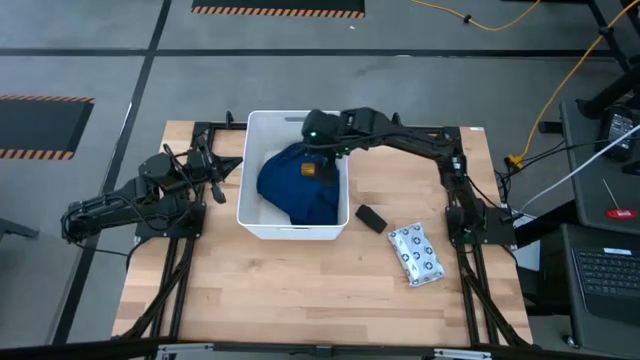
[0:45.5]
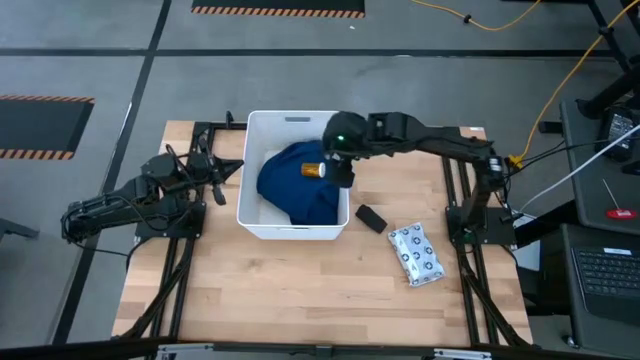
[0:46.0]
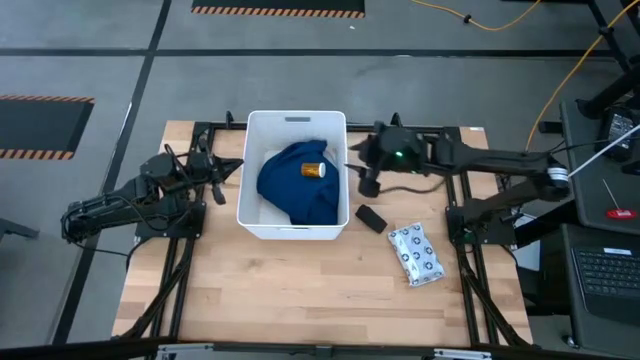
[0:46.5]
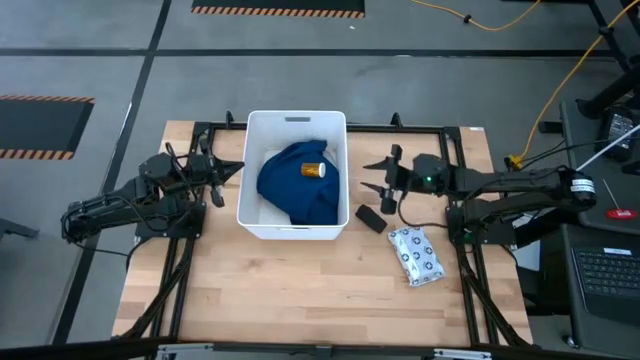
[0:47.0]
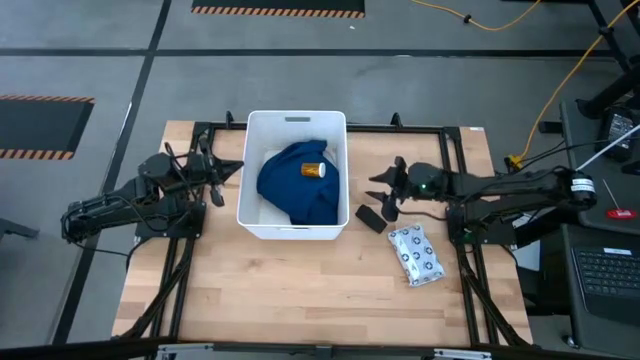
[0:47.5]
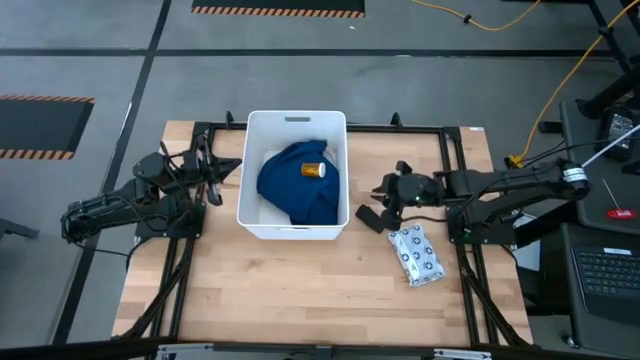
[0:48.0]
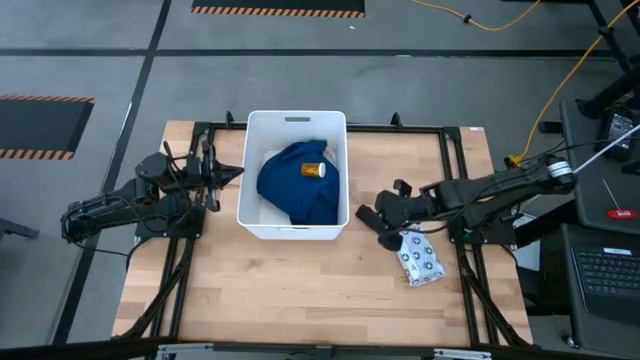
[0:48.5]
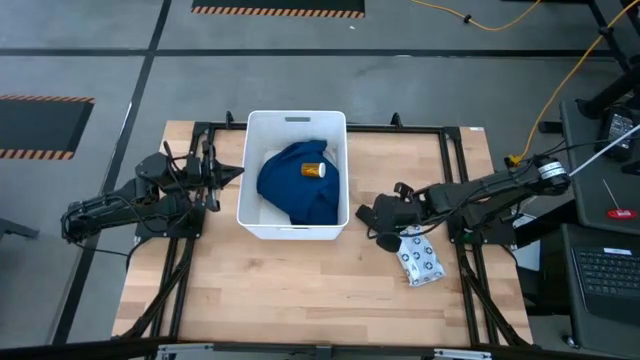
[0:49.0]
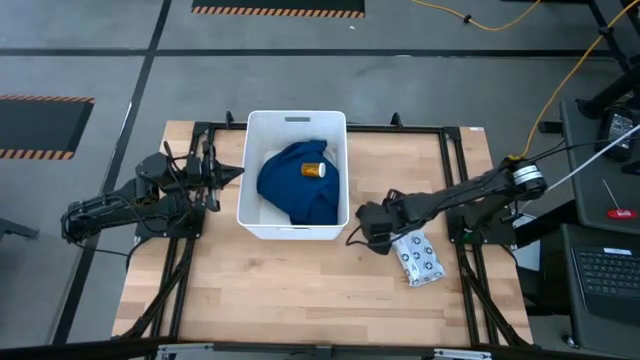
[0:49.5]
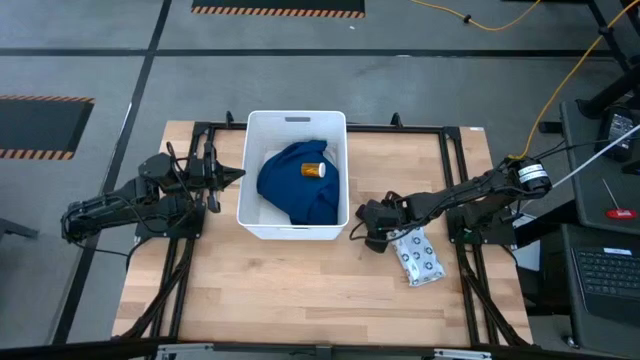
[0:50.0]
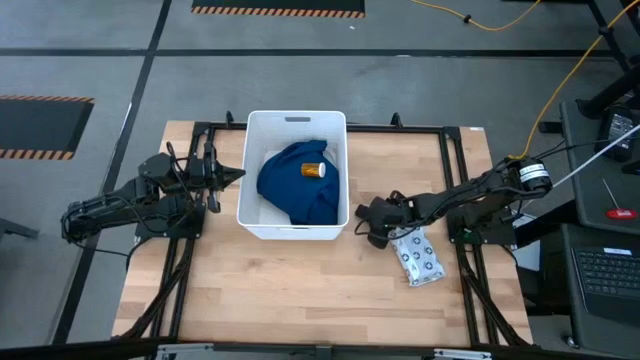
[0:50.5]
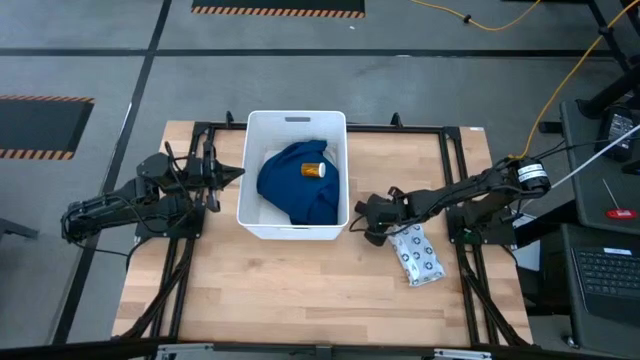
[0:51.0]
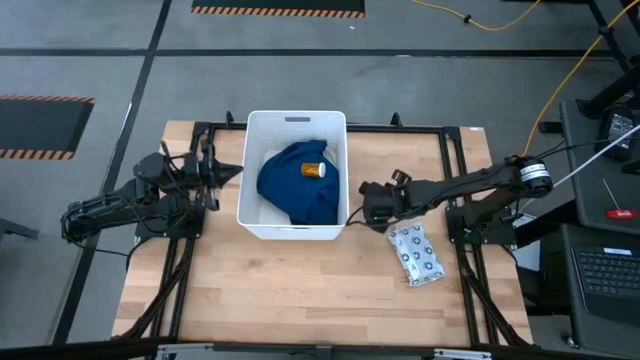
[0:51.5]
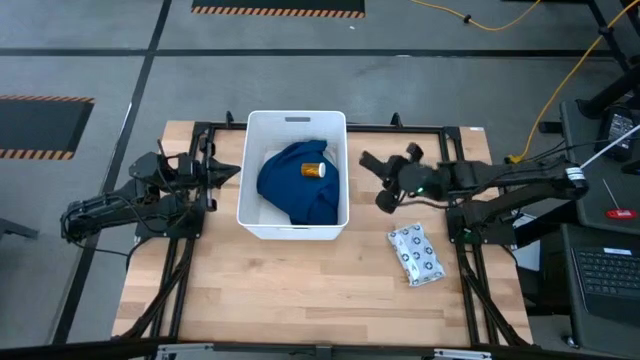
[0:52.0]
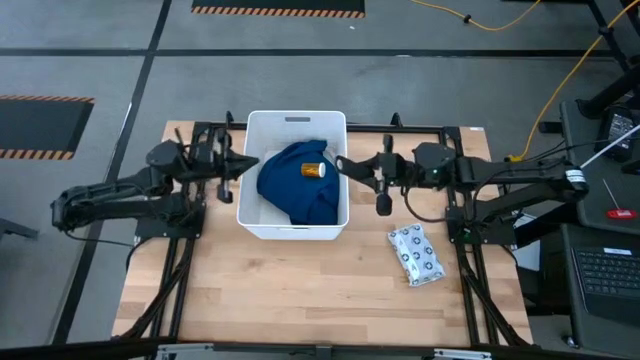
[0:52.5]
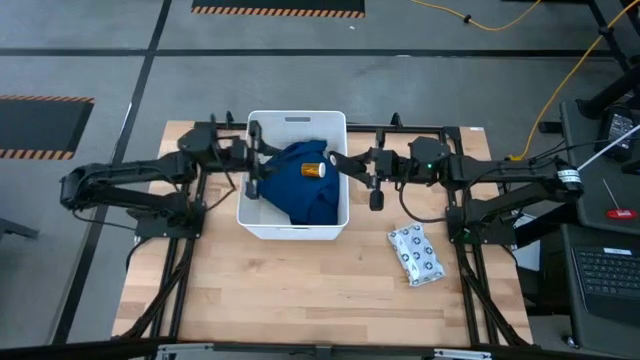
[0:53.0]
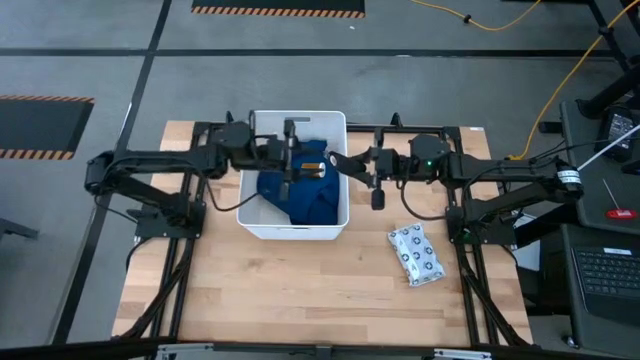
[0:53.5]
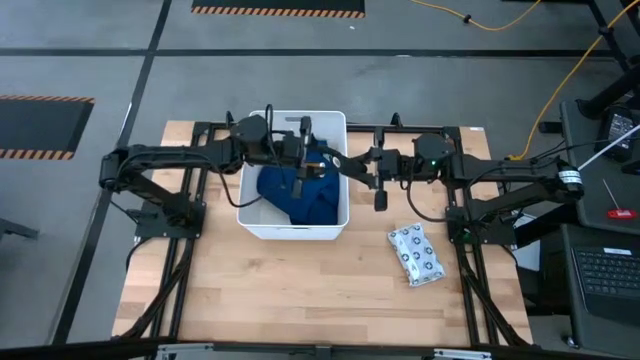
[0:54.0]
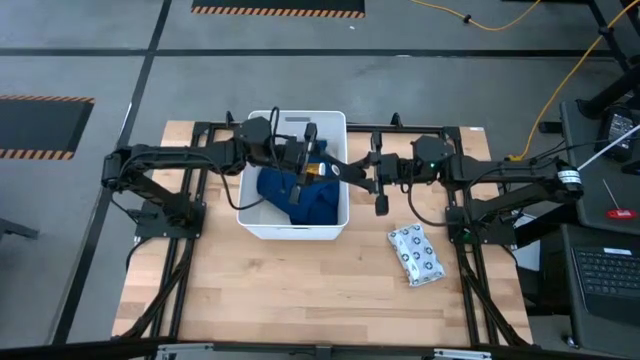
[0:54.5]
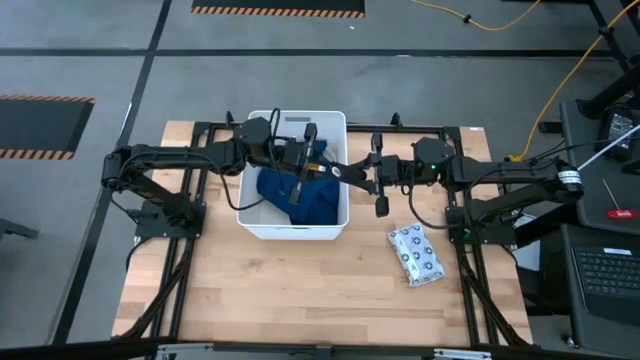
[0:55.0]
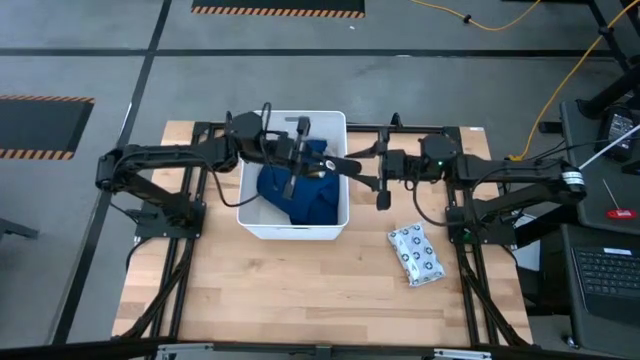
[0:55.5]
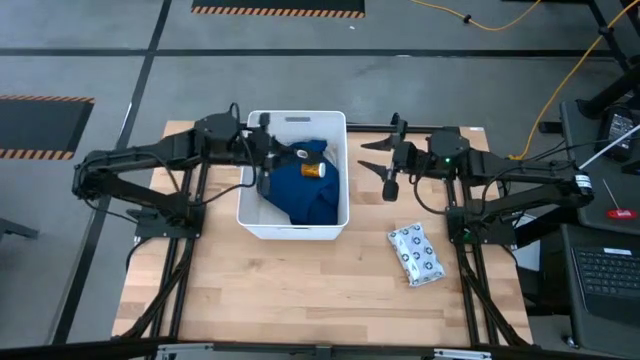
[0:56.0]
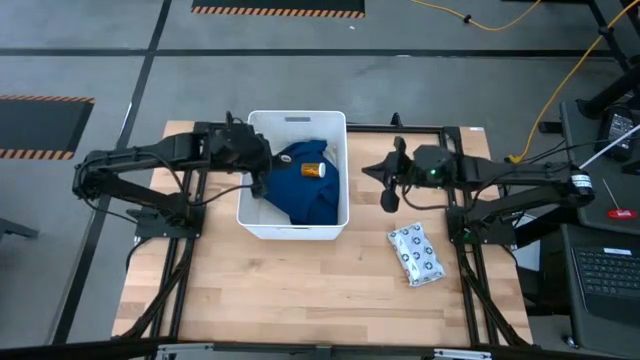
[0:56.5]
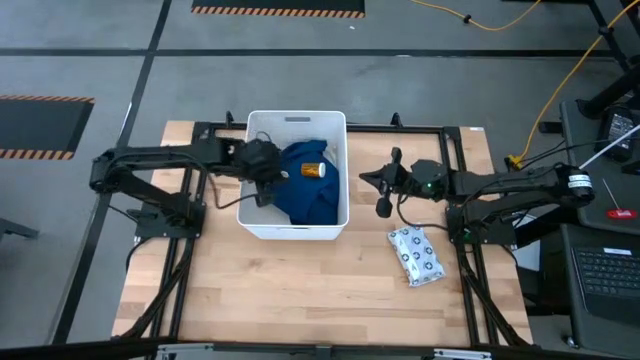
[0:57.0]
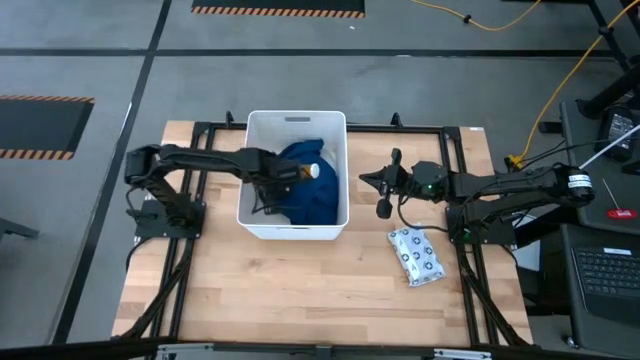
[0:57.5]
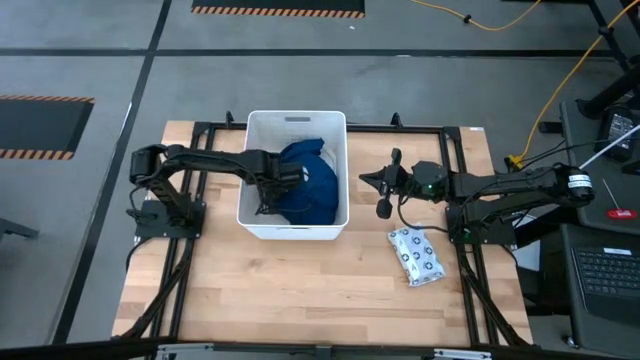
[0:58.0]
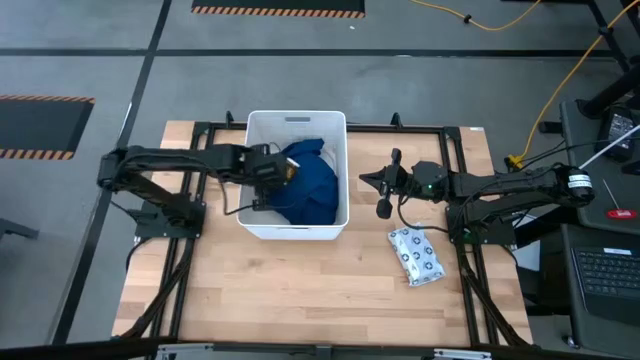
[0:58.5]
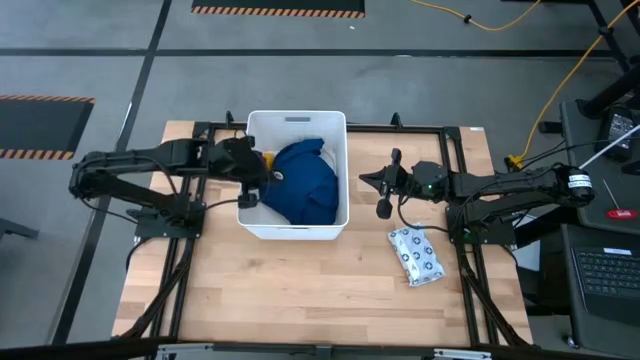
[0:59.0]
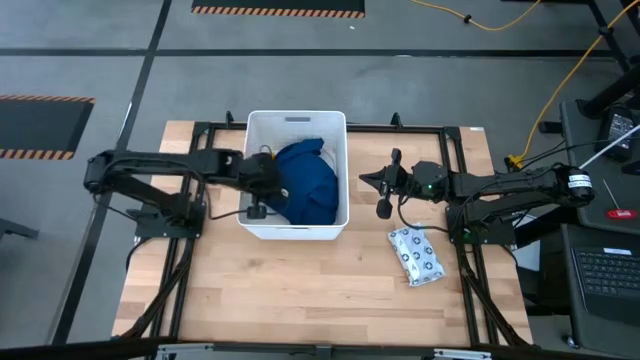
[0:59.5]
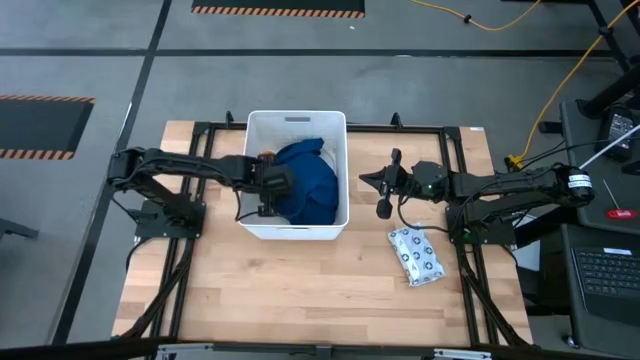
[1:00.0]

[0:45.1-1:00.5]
Task: Pick & place medical supplies in basket/bin
Put the black bandage into the white bin

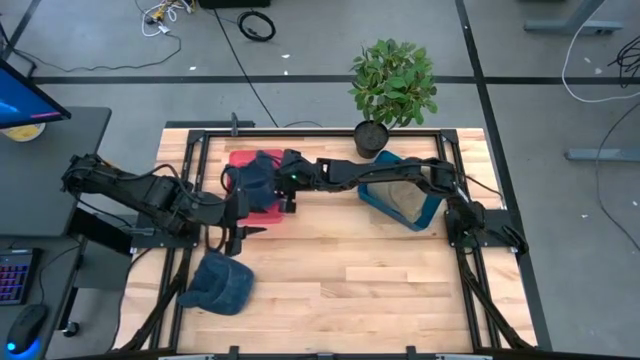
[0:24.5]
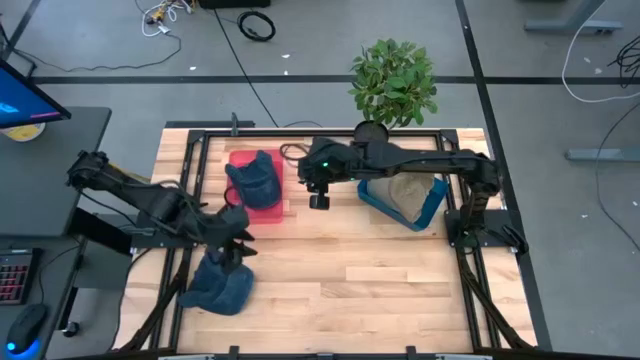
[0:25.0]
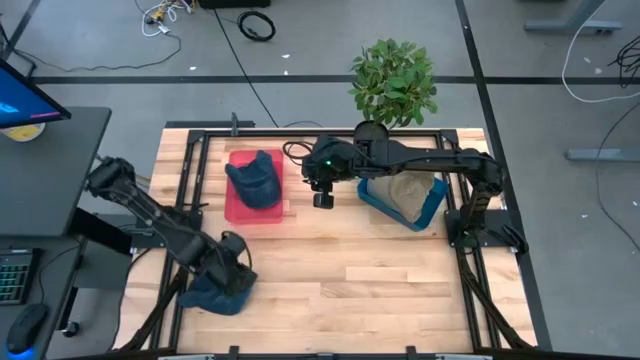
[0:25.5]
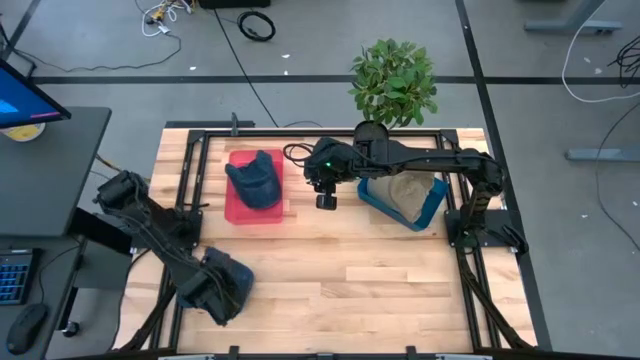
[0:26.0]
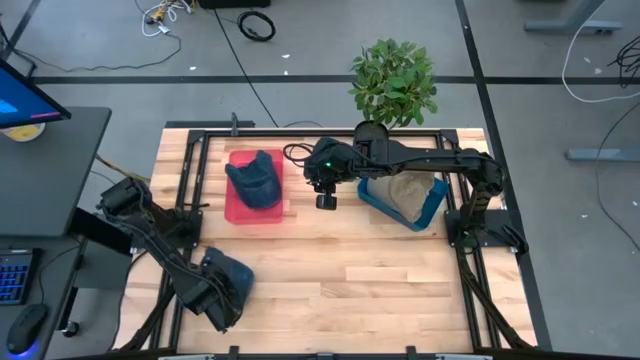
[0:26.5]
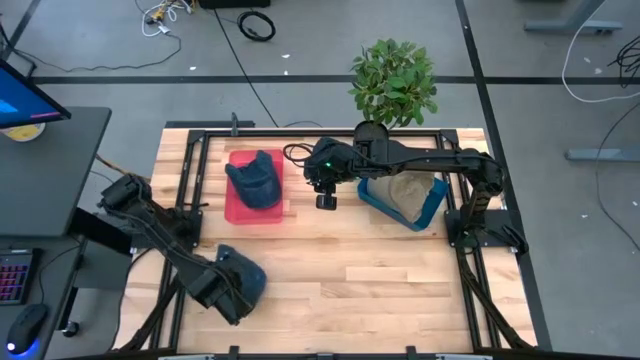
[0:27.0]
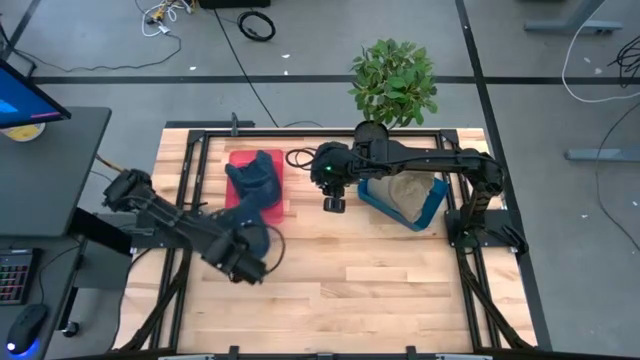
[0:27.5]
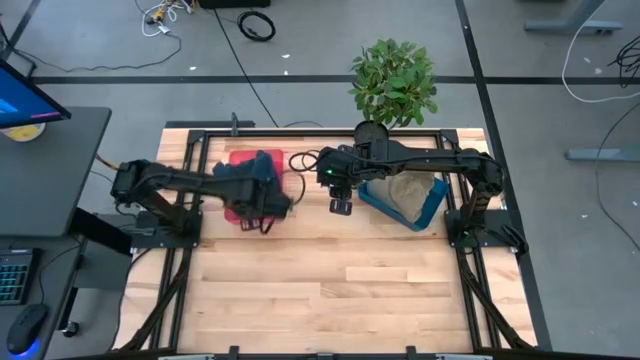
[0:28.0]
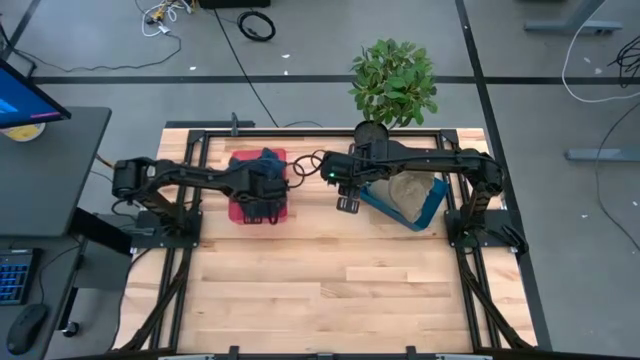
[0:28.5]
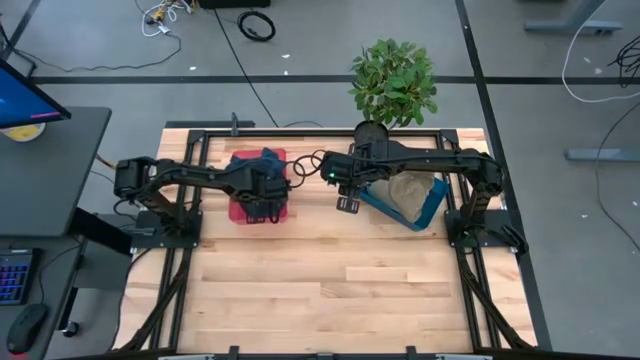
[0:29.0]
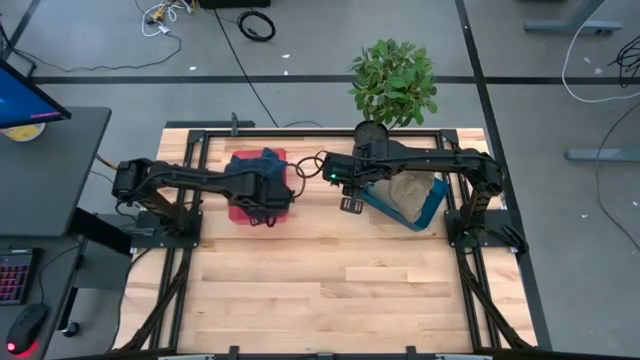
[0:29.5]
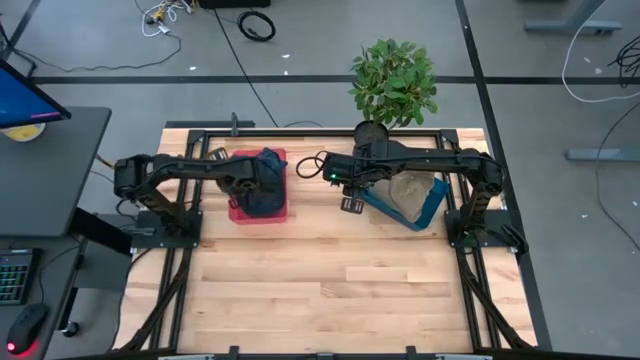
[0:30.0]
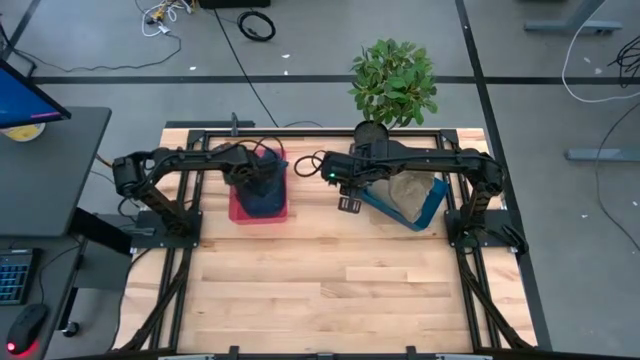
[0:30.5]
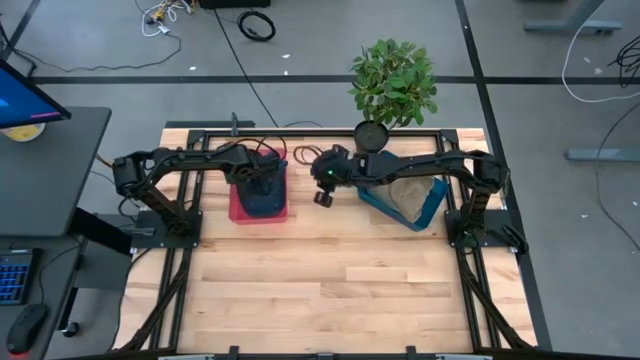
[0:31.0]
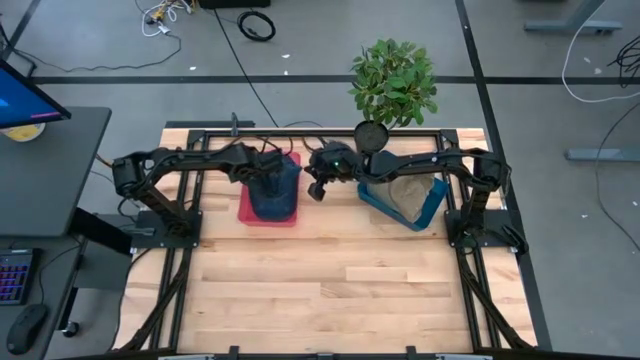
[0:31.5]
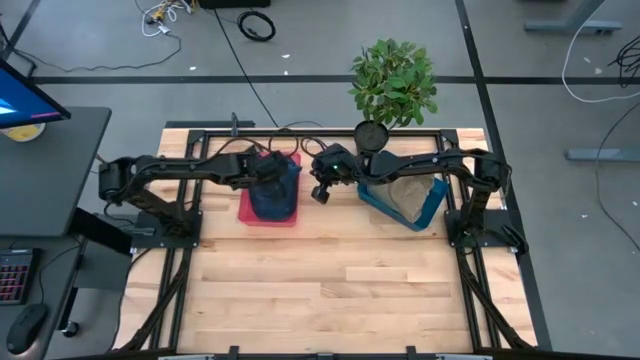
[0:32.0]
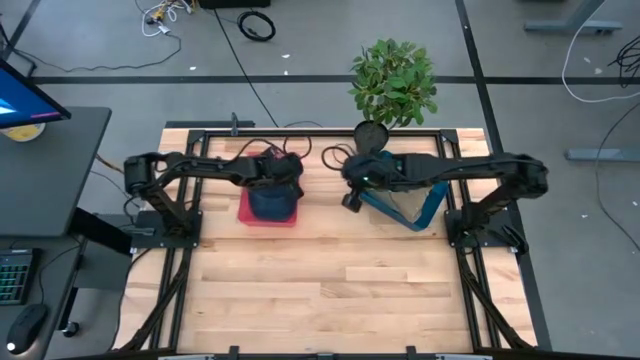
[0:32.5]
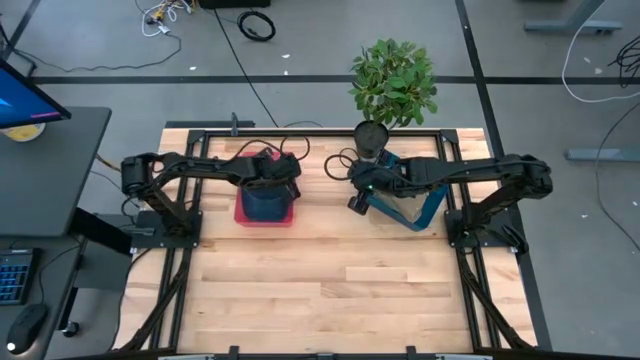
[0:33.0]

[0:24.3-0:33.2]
Task: Pick & Place hat
Put the blue cap into the red bin
